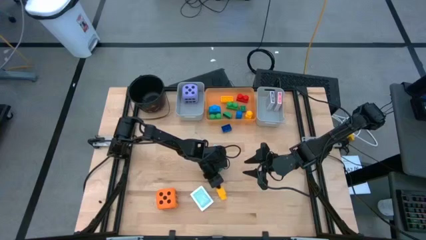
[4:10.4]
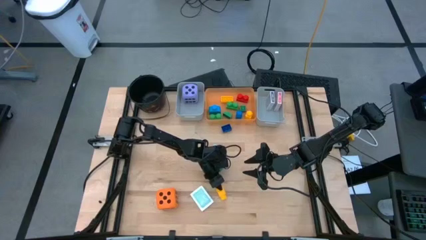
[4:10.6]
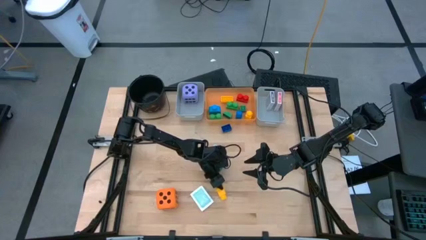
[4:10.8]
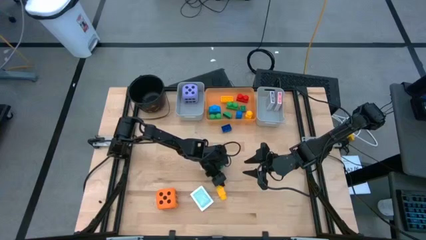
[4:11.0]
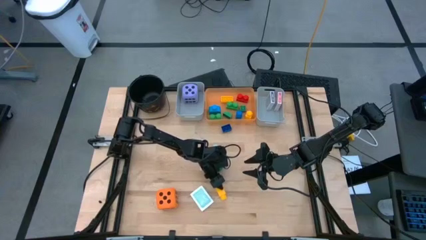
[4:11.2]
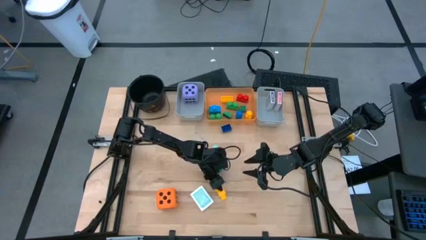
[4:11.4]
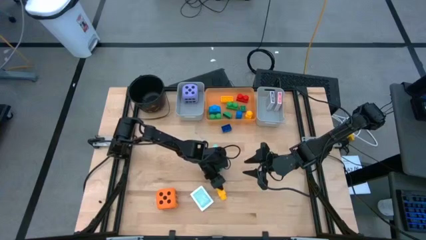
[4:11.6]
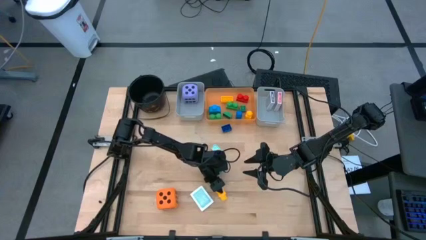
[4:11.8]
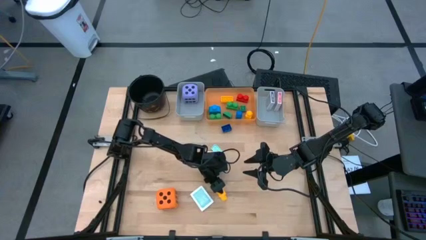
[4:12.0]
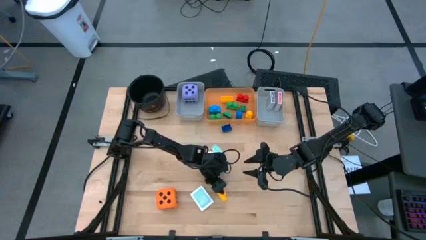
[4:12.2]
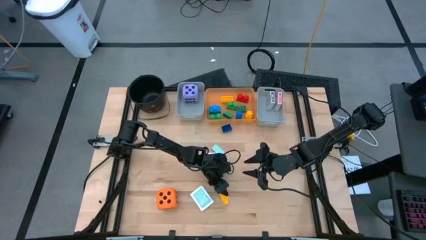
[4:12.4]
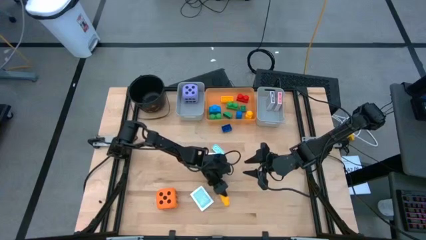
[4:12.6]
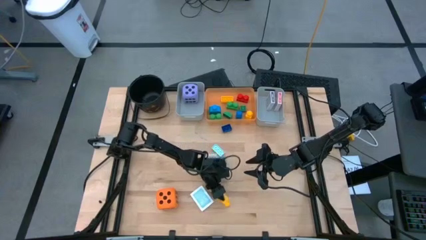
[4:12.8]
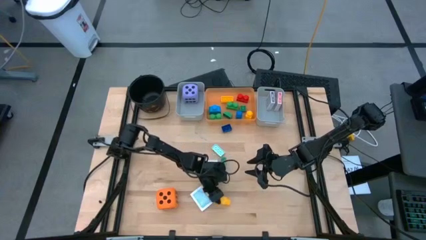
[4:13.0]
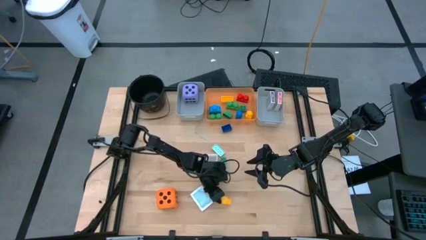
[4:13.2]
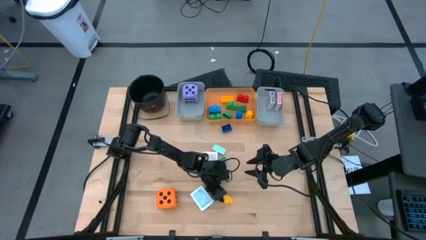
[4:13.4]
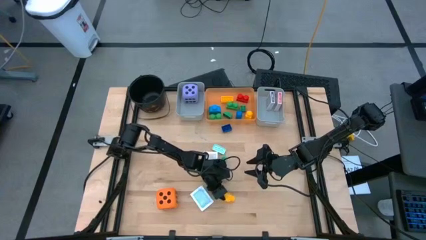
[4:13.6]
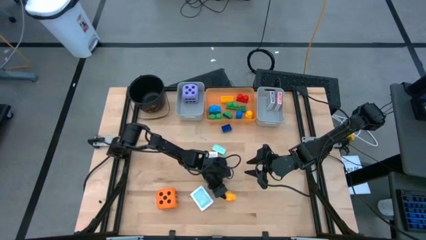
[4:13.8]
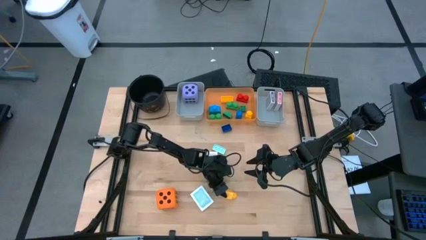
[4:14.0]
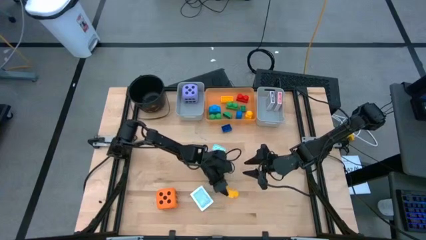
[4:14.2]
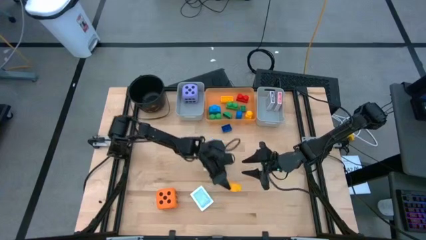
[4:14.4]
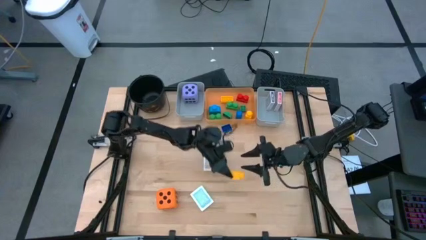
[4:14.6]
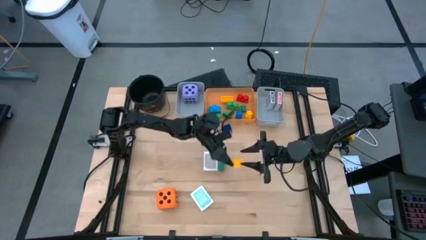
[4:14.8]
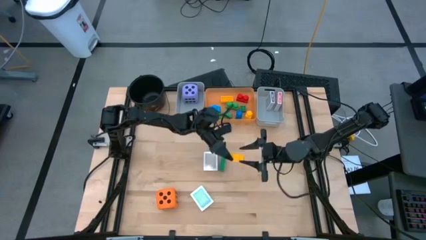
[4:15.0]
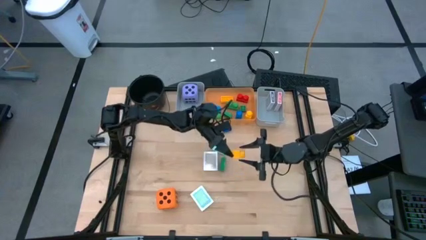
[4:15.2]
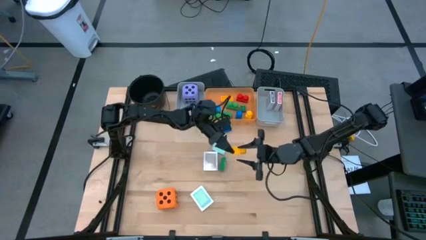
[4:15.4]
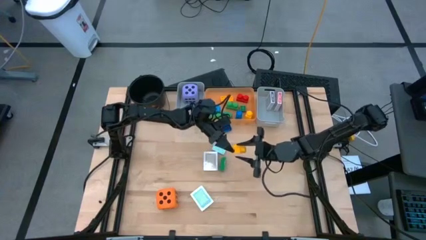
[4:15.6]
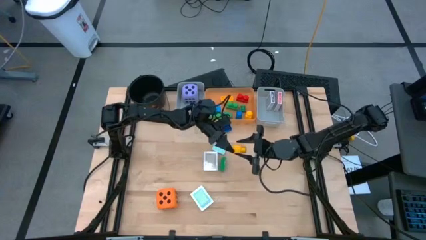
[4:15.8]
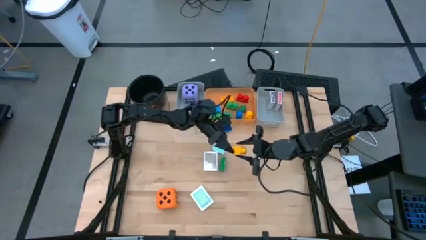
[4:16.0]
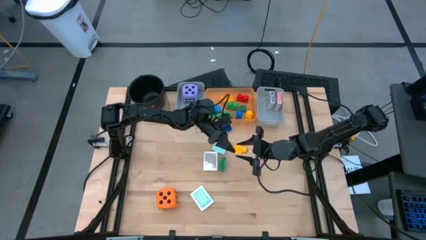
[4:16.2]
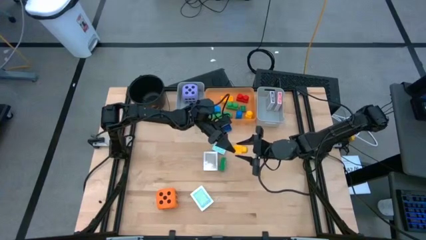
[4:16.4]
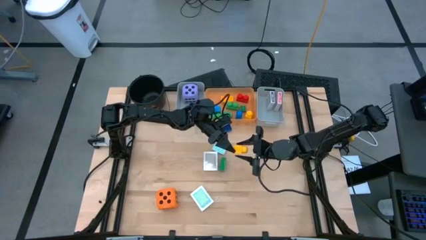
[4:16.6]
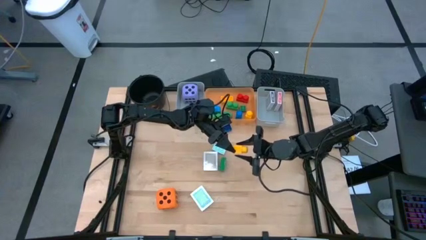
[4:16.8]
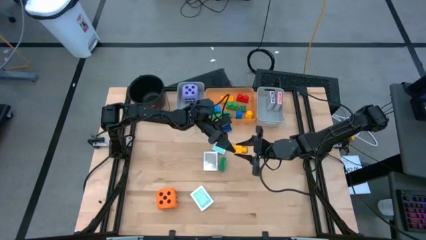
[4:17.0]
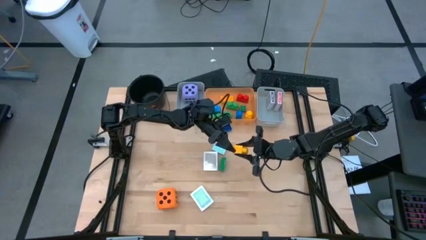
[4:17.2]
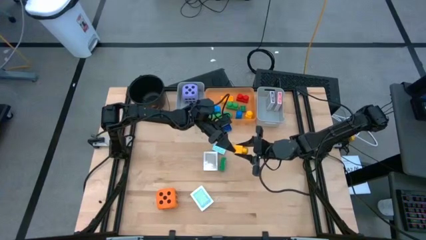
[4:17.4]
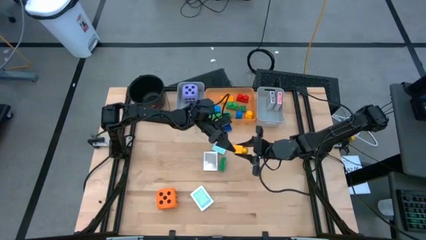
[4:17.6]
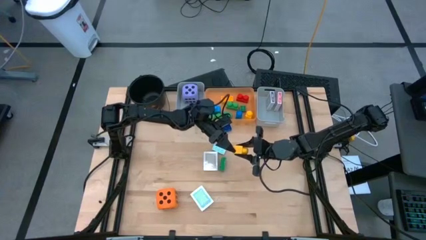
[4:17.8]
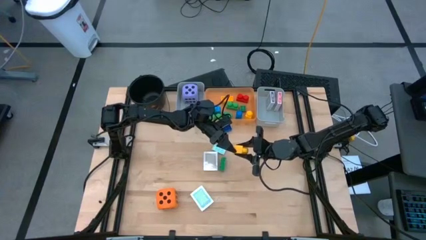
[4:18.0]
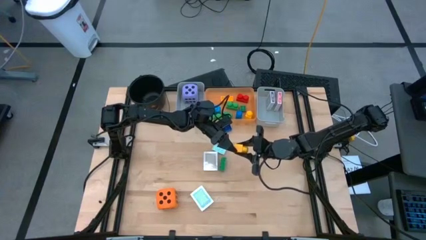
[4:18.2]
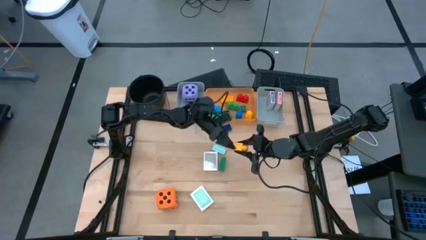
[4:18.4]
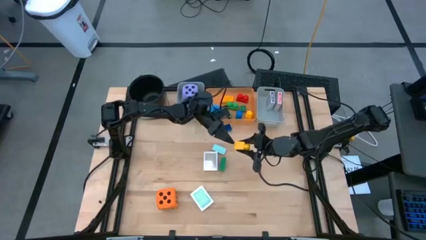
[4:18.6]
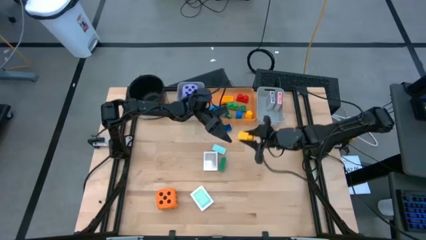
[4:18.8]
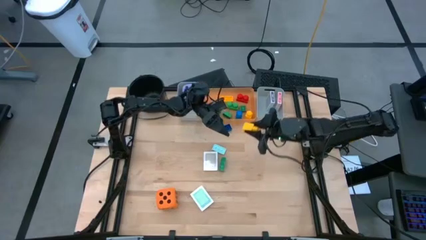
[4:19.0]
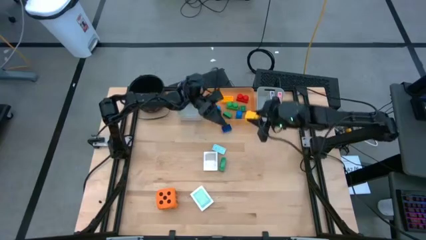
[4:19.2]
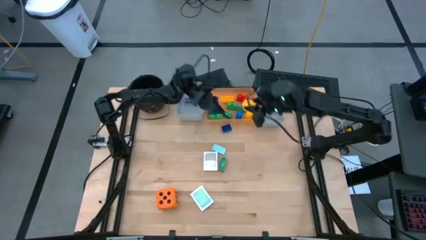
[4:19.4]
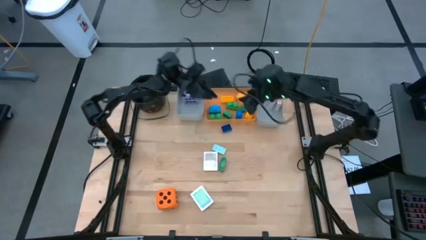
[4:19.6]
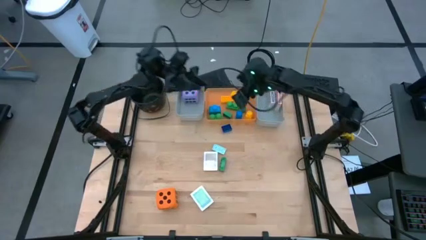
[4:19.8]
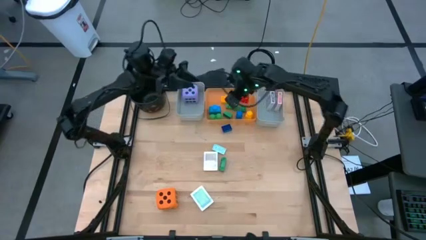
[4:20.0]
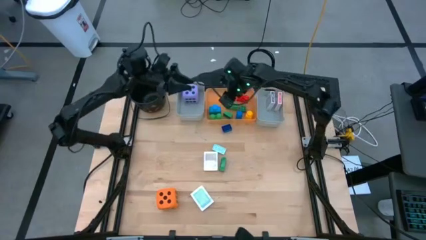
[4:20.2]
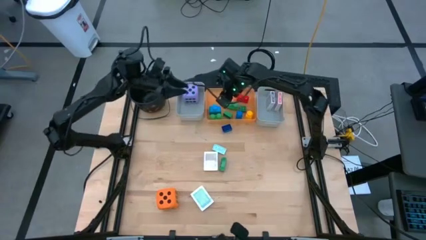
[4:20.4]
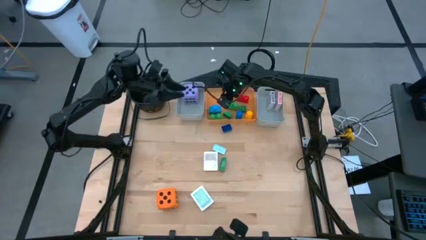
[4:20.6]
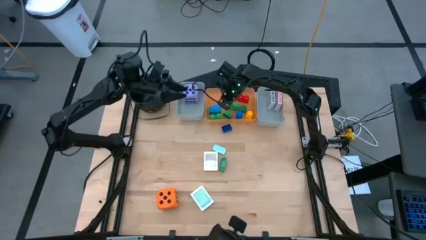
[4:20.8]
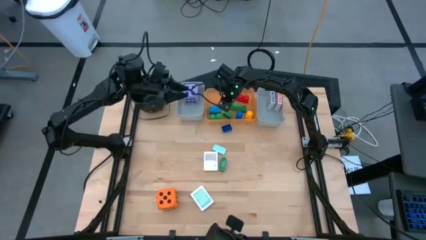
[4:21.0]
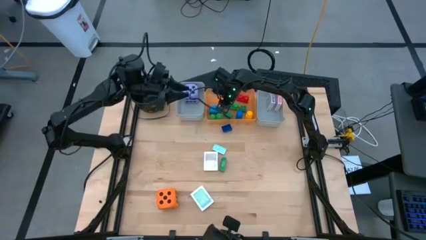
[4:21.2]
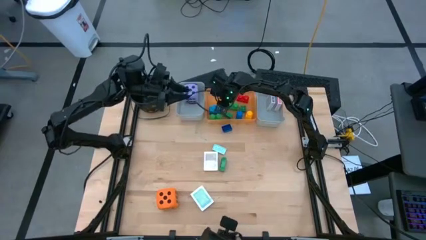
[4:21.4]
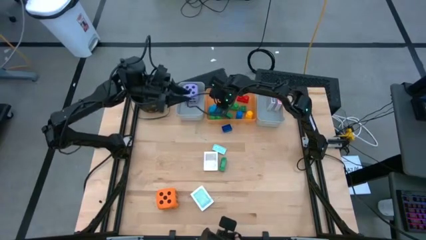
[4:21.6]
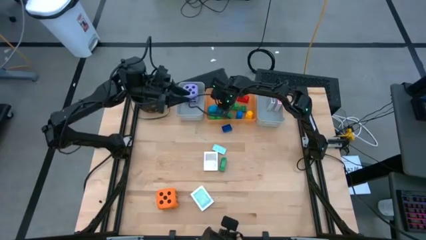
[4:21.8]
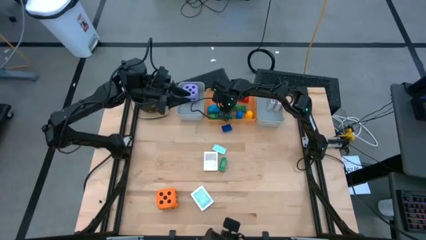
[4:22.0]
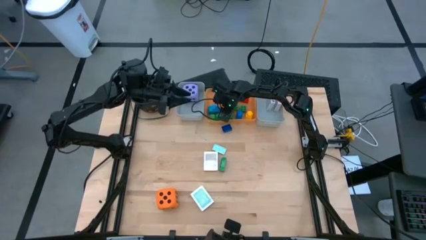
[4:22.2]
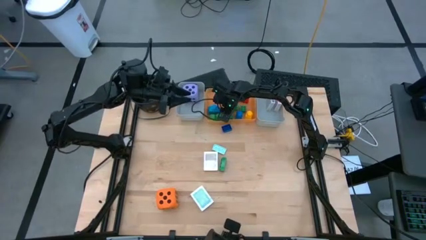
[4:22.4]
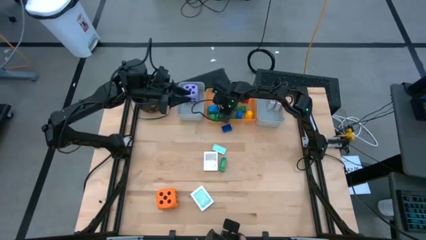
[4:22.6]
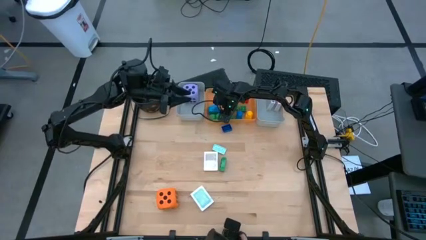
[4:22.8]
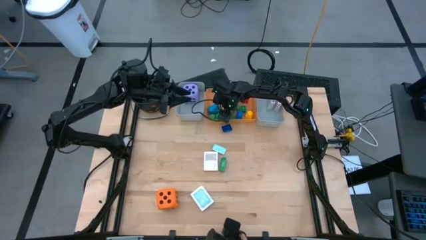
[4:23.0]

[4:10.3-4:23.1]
Task: Pick & Place Toys
Put the yellow game piece into the orange bin
